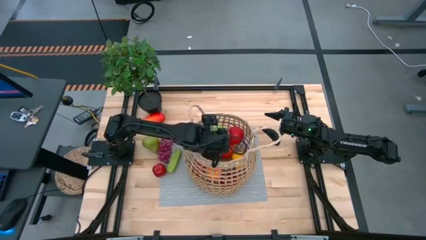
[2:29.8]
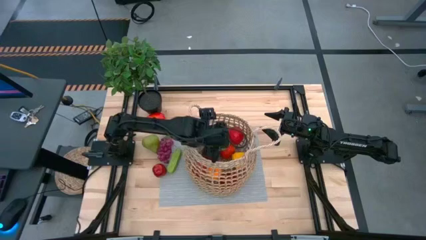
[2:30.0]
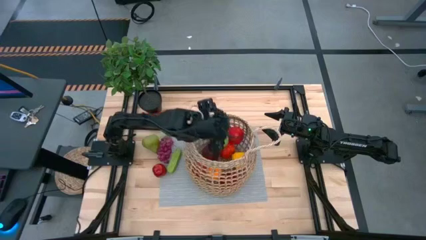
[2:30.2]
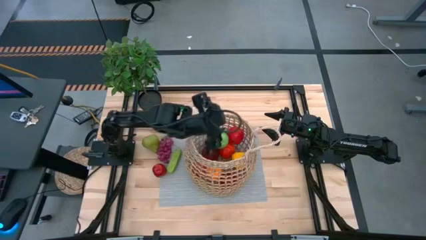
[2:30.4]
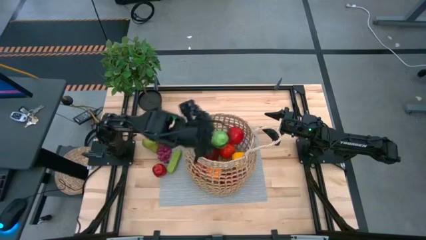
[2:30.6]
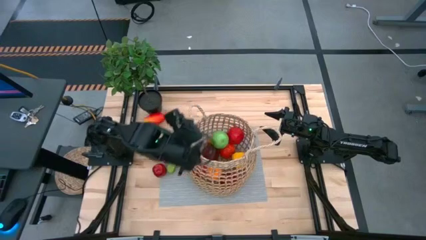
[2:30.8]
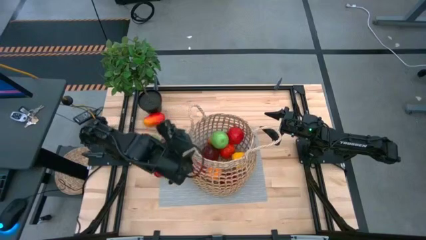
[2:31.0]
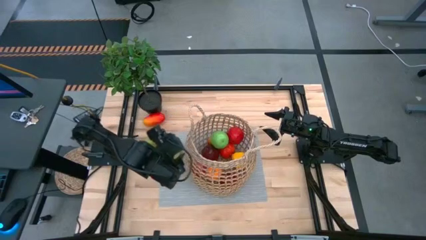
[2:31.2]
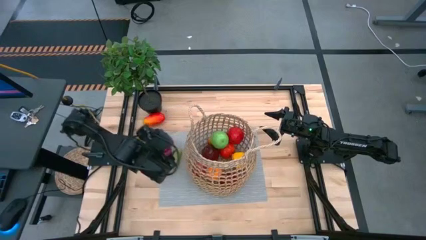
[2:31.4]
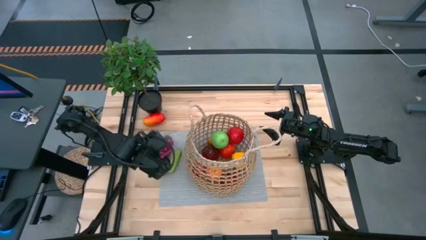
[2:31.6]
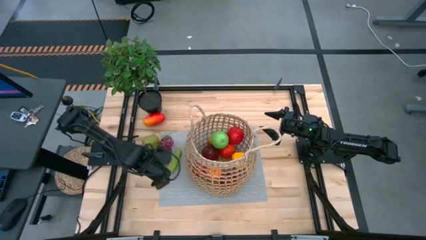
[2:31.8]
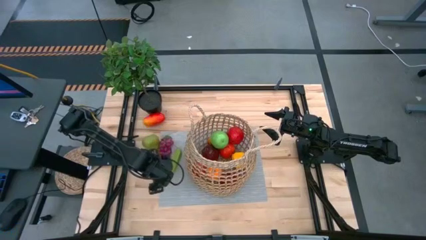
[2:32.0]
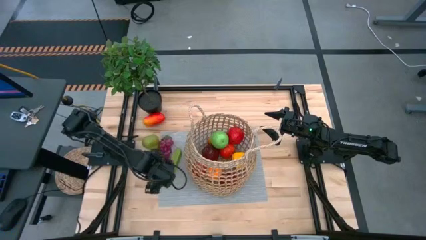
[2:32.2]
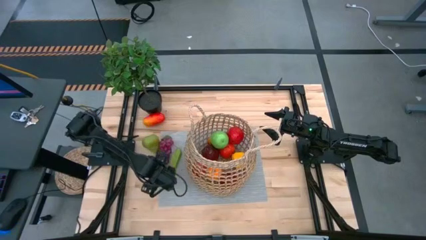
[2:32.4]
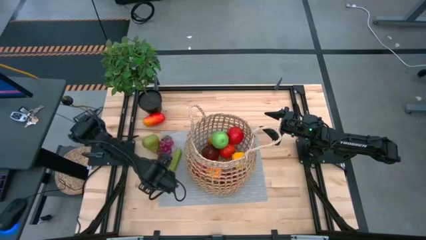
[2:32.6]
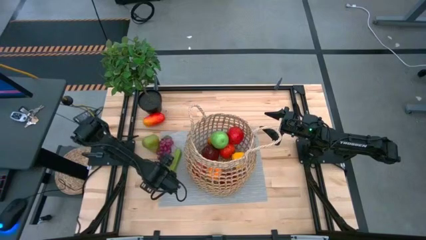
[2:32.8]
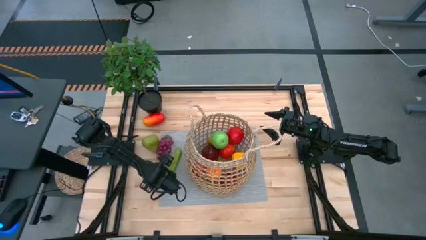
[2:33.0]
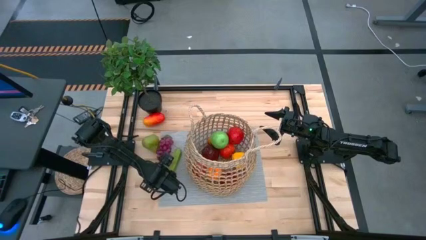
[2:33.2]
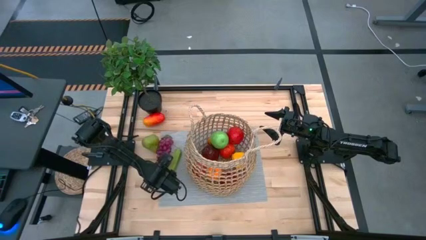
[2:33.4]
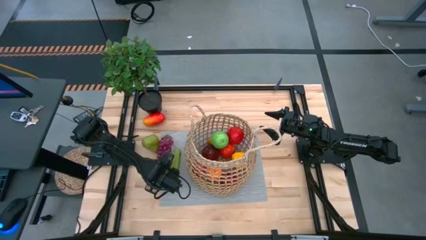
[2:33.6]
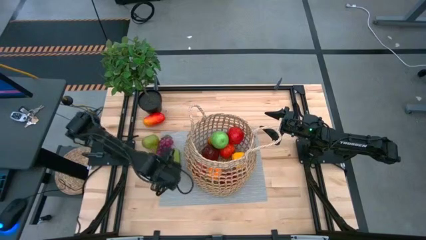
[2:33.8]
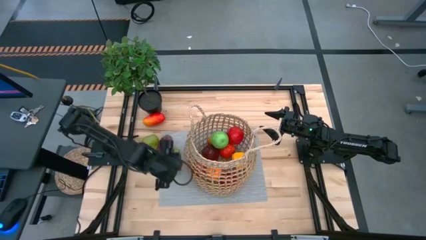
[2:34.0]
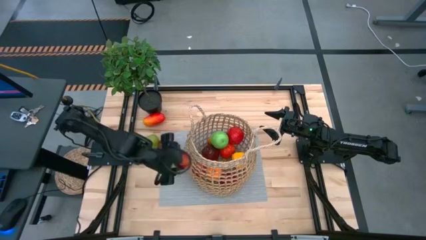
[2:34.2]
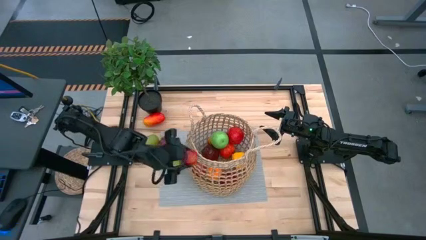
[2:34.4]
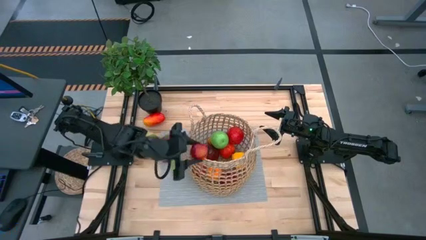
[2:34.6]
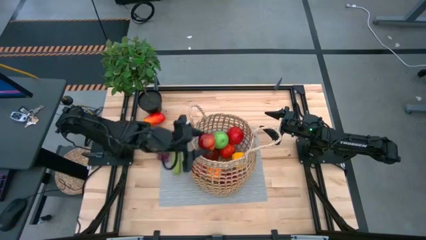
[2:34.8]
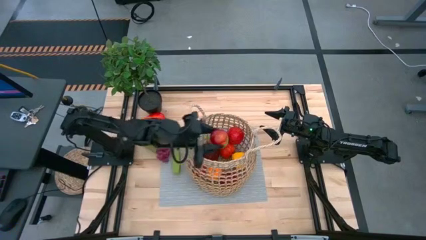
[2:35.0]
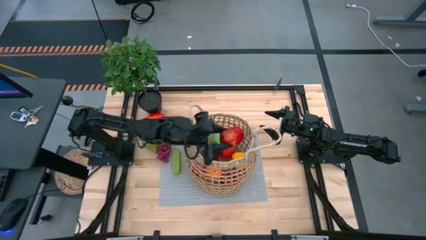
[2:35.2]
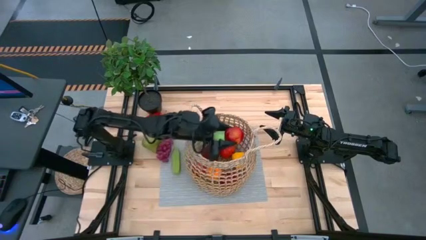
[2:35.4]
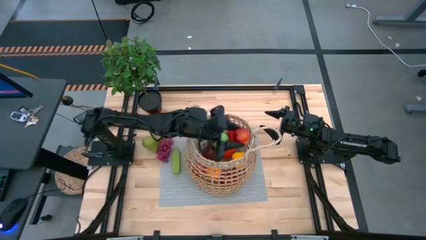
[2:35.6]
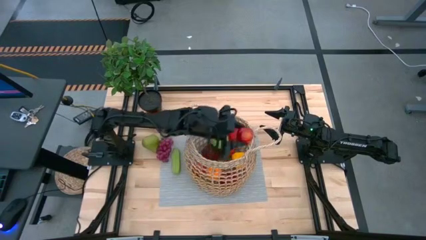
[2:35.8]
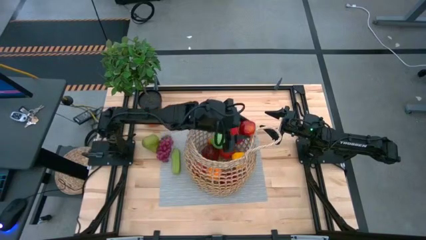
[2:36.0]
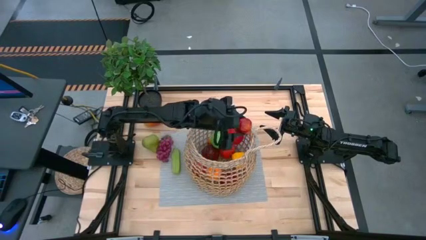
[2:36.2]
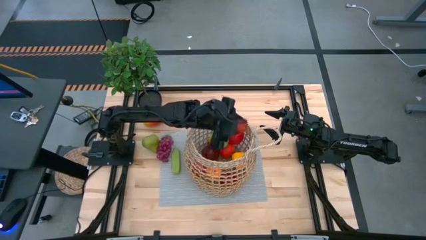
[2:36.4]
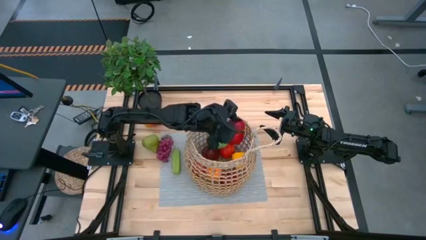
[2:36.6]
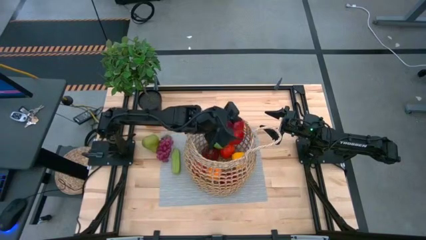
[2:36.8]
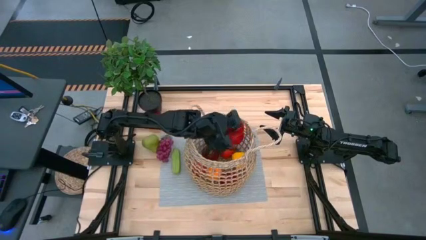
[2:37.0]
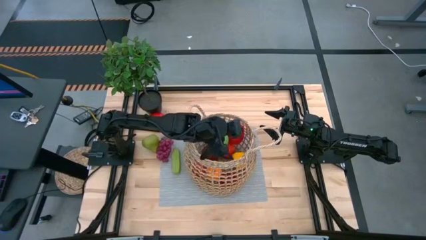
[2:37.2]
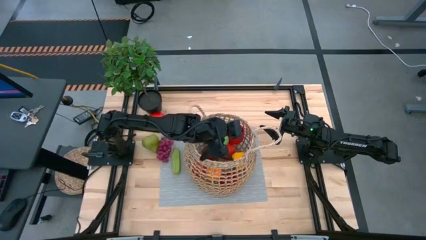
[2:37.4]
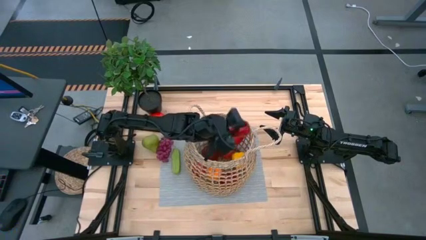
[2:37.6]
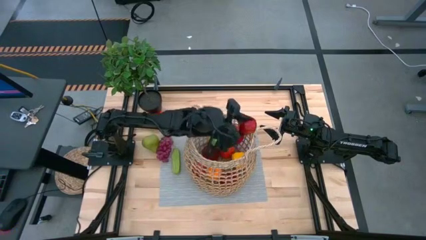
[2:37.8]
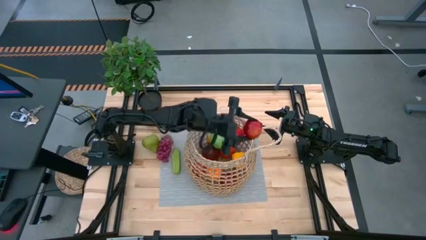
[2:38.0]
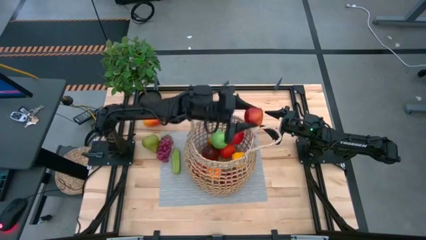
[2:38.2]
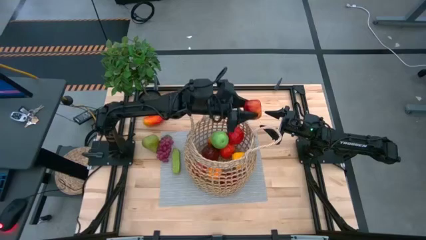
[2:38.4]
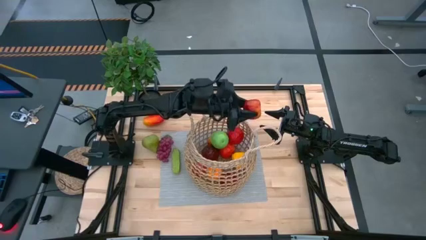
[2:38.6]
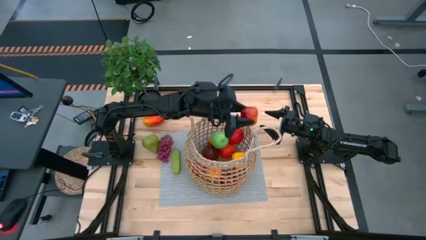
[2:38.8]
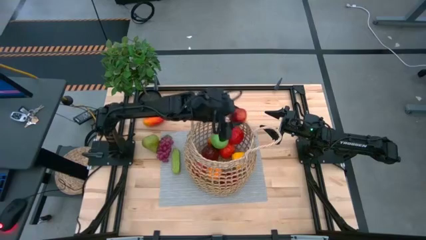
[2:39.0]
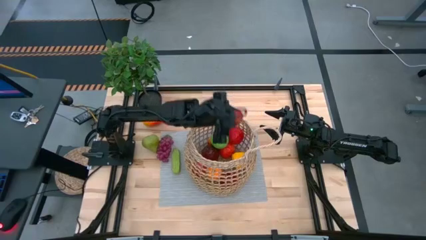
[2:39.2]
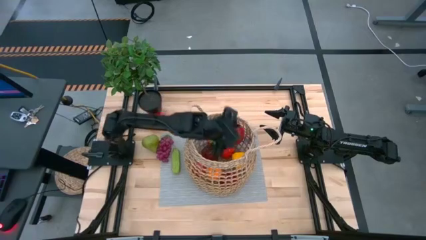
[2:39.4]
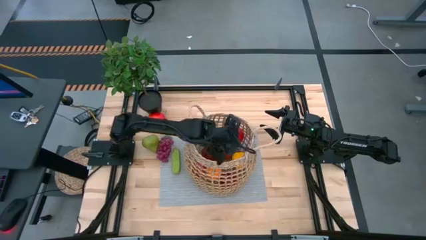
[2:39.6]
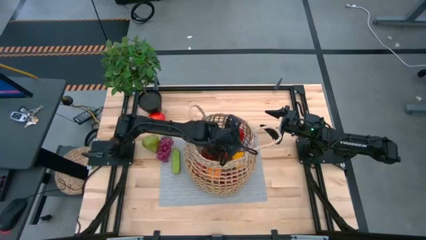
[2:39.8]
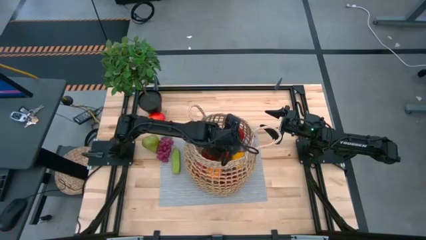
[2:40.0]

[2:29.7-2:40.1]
Task: Build produce basket
Put the red apple into the brown basket

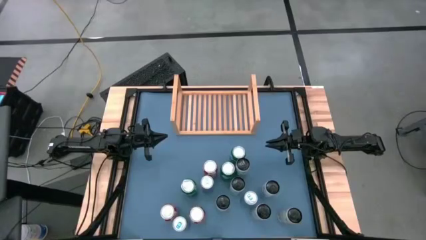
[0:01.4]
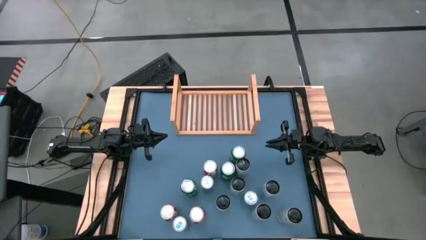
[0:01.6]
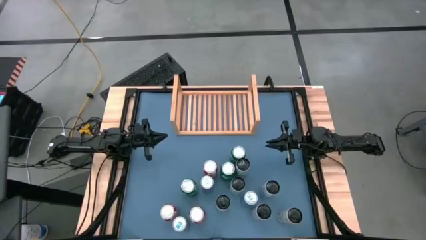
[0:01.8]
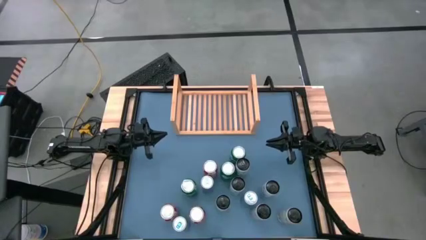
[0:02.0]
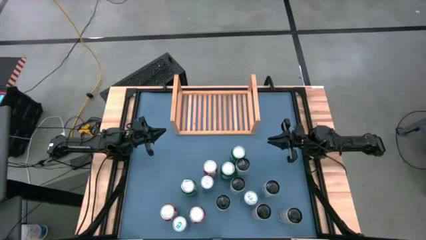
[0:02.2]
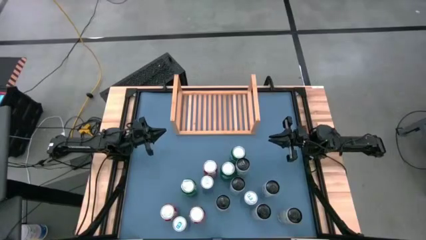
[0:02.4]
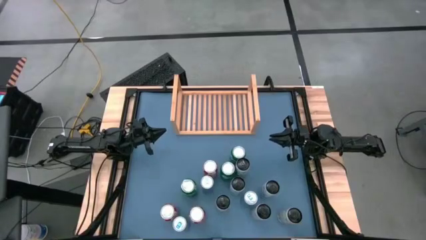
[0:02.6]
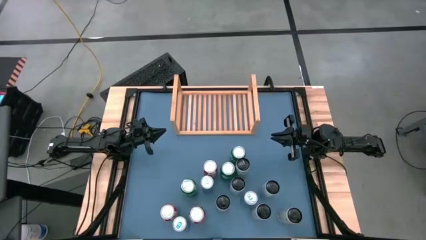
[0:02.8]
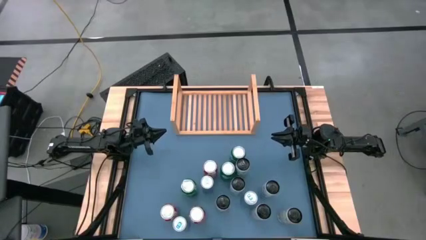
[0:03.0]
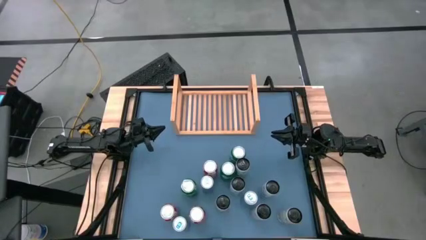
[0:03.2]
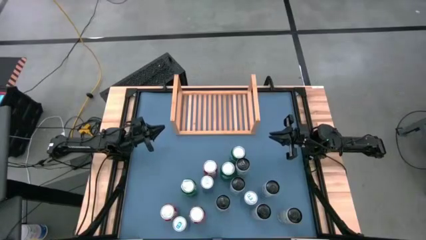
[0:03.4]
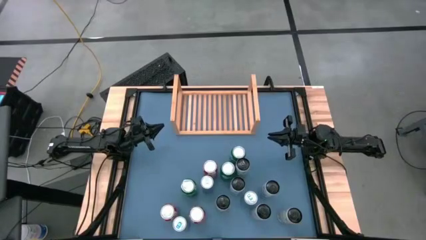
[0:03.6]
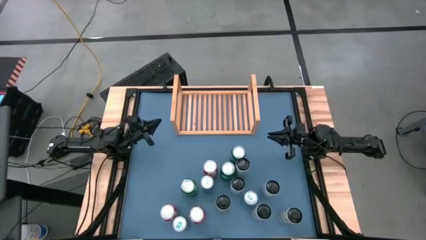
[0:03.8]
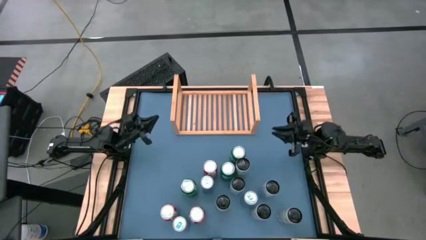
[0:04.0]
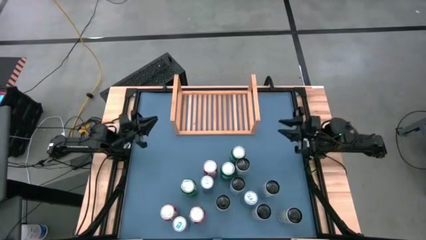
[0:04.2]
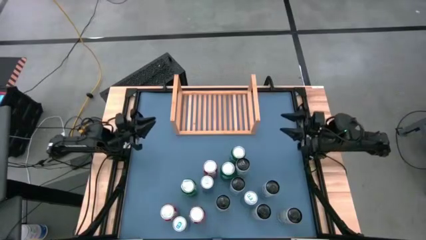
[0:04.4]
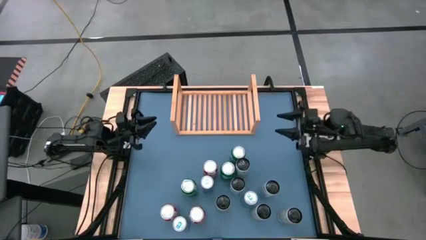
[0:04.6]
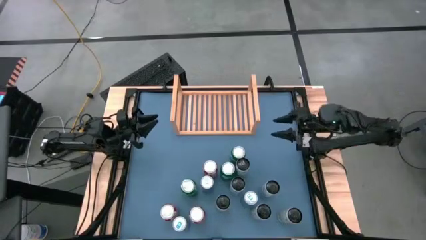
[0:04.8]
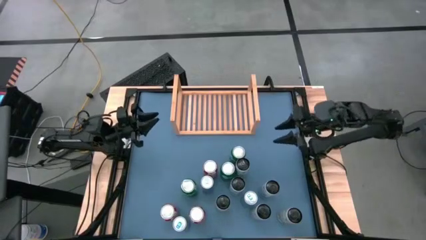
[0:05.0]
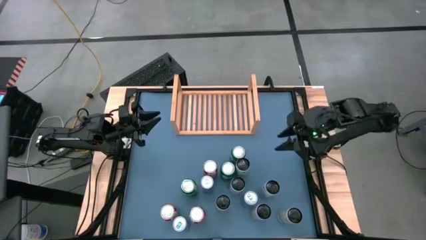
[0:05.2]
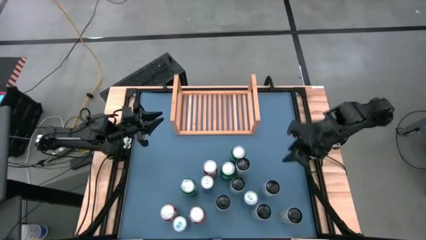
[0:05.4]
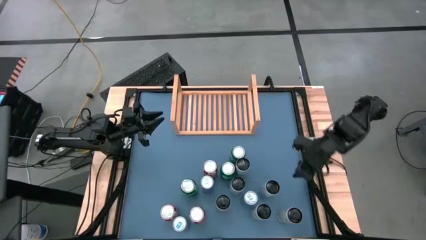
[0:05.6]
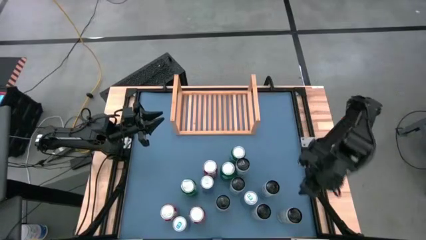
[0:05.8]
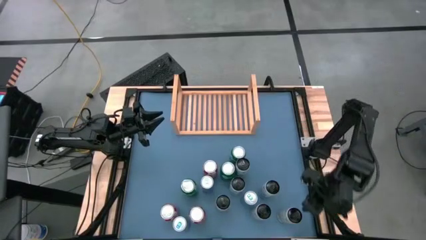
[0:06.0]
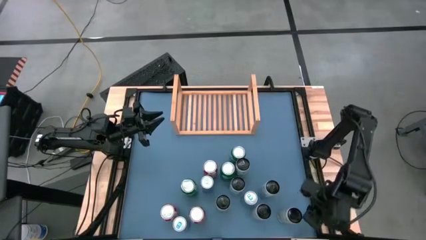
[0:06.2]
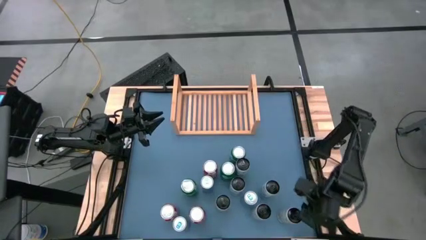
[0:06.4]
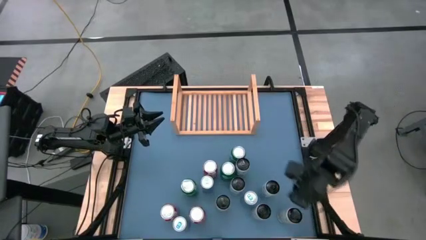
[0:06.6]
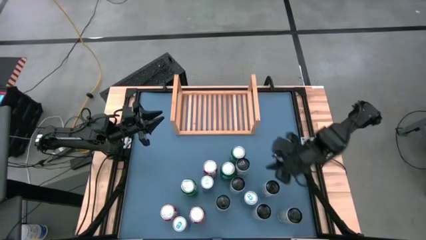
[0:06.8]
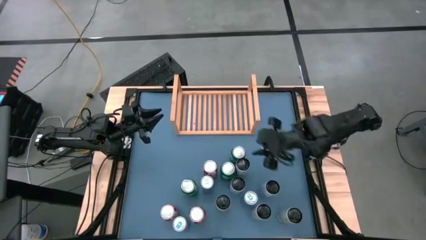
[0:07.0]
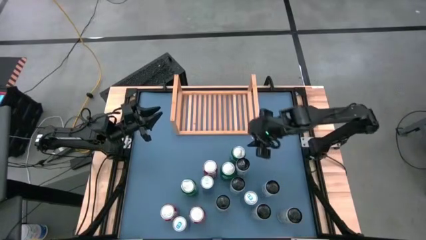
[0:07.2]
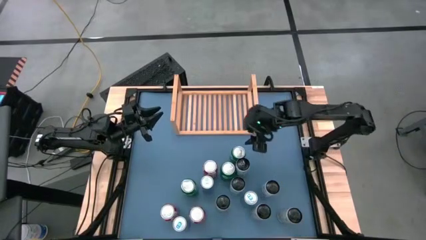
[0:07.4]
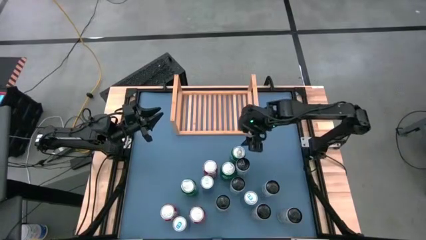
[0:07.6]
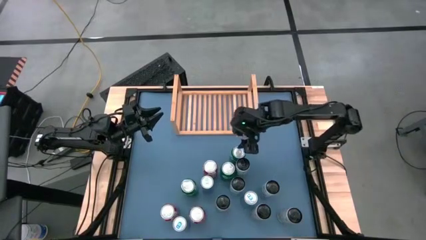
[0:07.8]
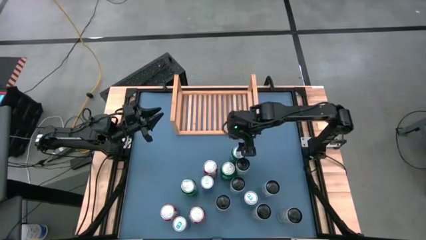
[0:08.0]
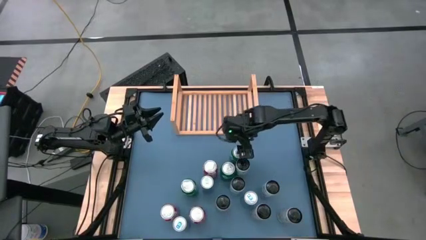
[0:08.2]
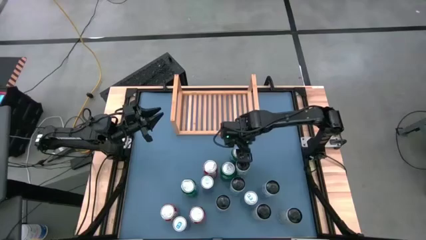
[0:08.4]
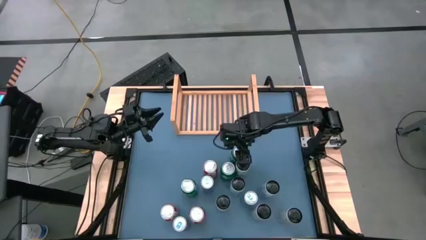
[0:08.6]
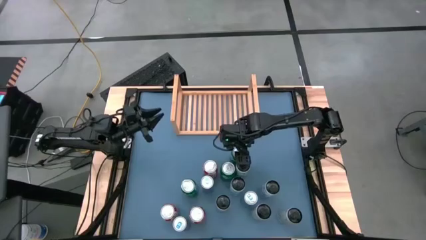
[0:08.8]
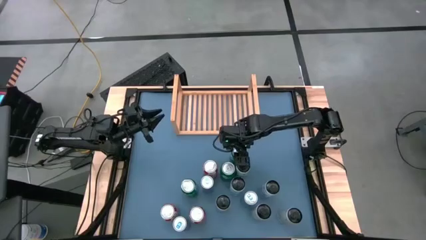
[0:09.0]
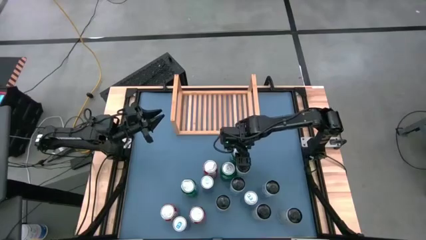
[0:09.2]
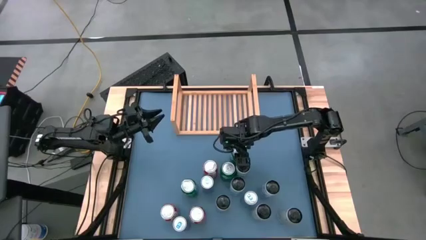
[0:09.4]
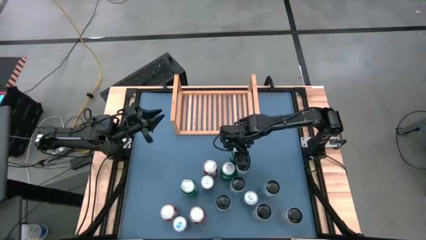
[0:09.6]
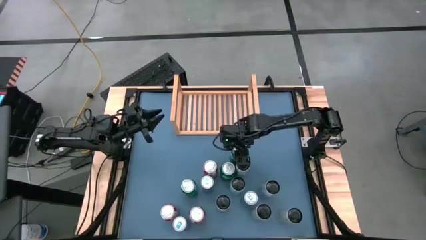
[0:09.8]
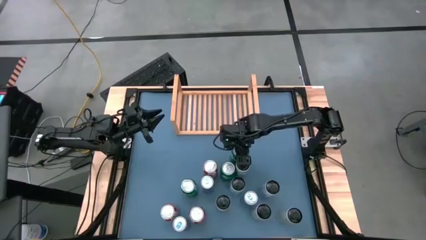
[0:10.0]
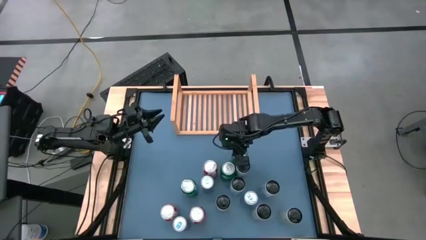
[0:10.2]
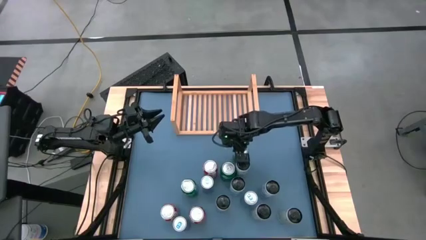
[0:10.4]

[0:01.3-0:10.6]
Task: Place canned beverage on shelf
Put the top right green soda can aligned with the green soda on the shelf
